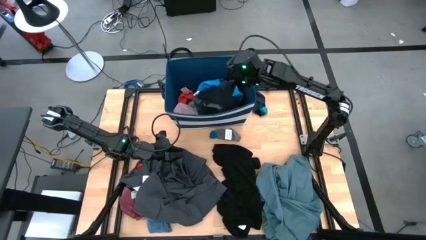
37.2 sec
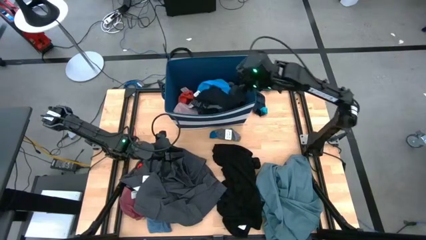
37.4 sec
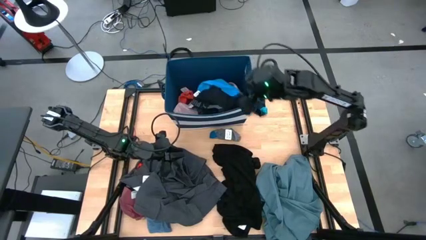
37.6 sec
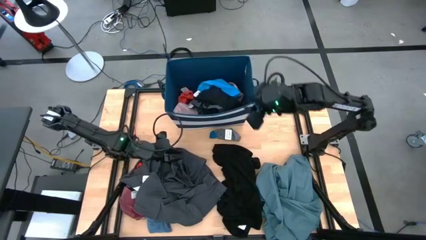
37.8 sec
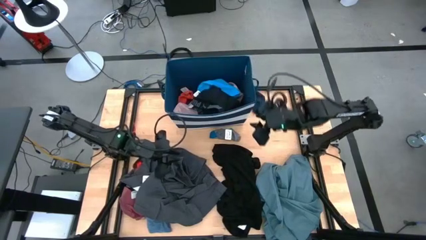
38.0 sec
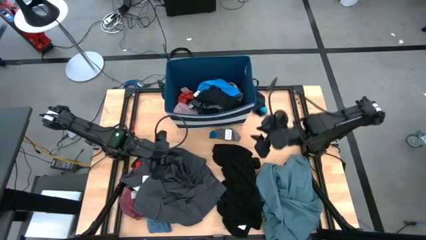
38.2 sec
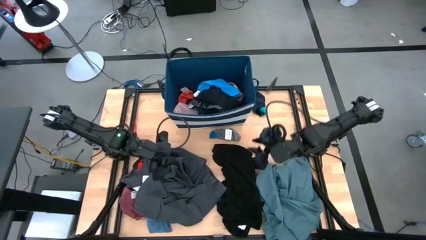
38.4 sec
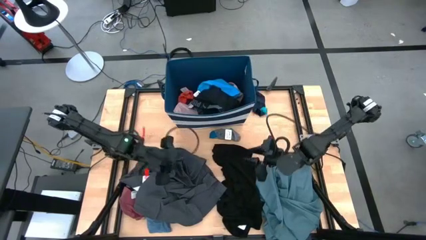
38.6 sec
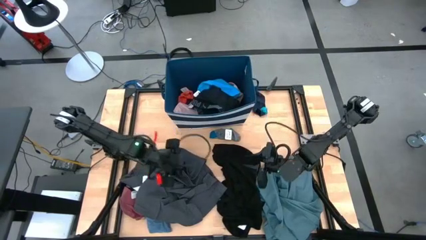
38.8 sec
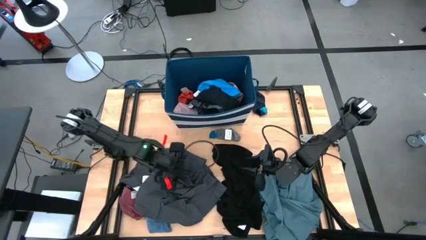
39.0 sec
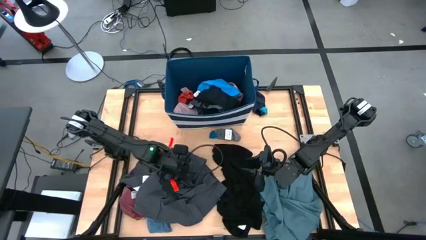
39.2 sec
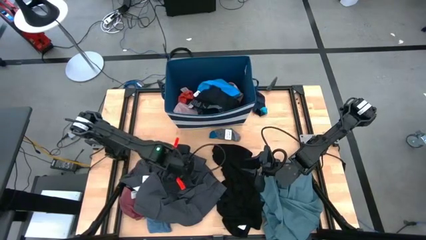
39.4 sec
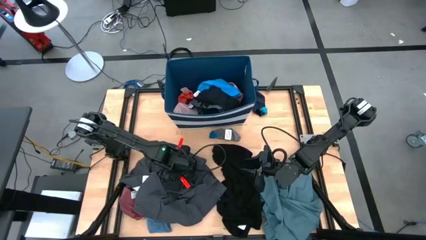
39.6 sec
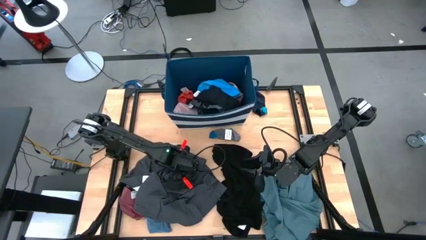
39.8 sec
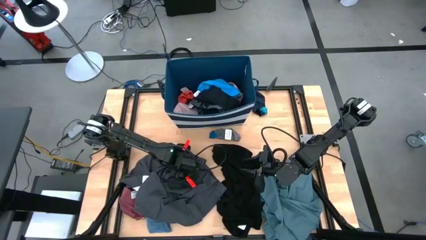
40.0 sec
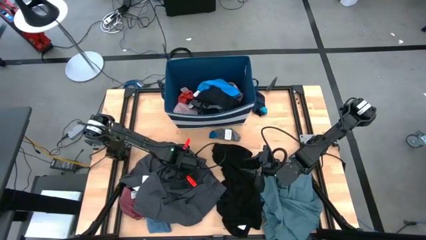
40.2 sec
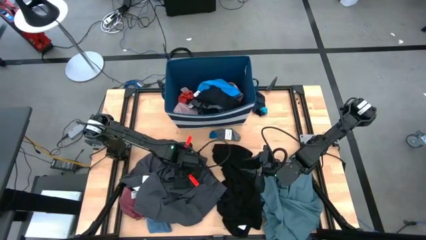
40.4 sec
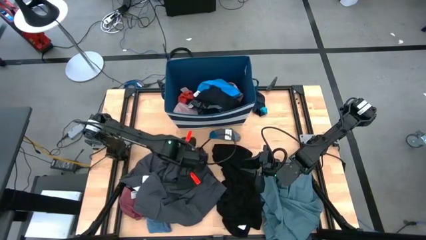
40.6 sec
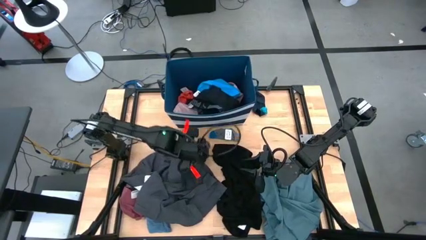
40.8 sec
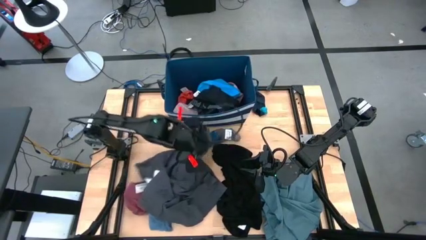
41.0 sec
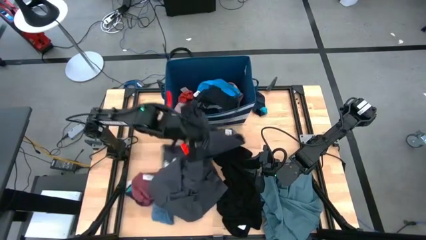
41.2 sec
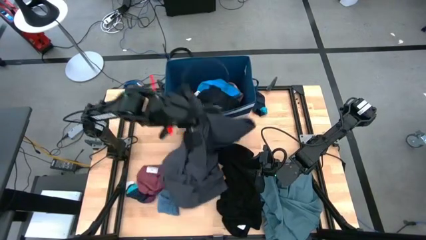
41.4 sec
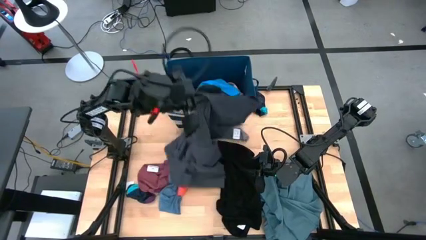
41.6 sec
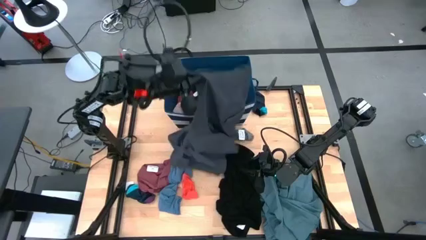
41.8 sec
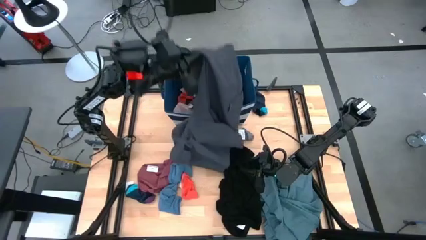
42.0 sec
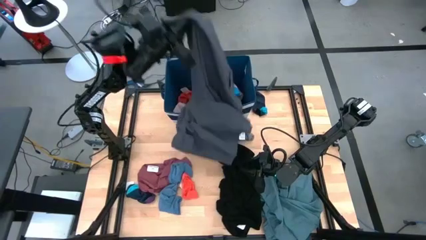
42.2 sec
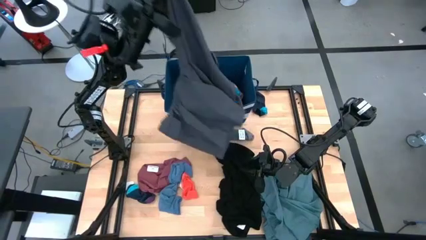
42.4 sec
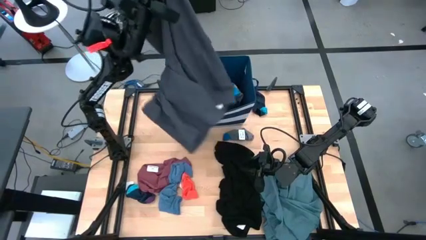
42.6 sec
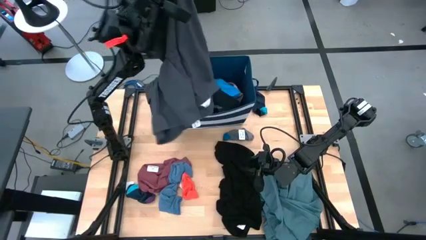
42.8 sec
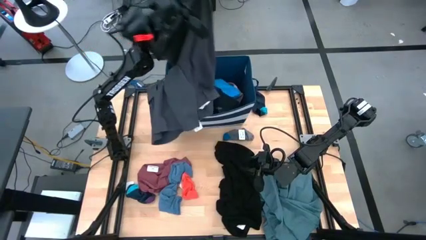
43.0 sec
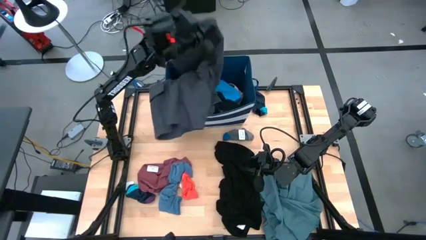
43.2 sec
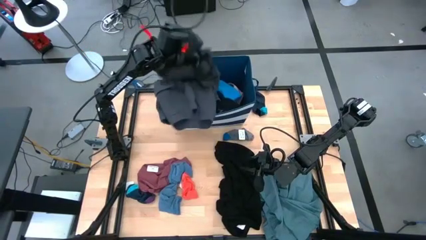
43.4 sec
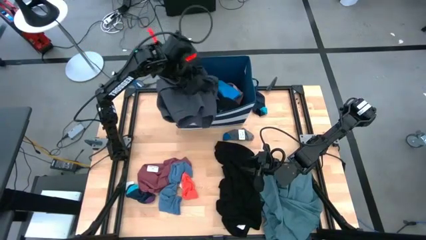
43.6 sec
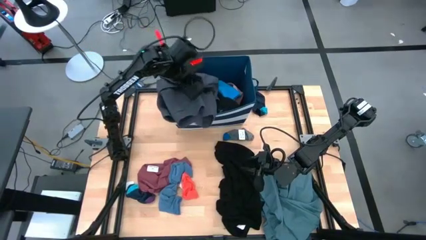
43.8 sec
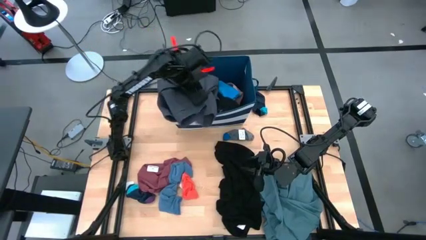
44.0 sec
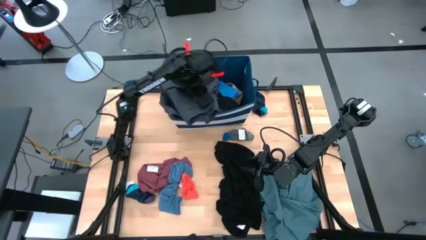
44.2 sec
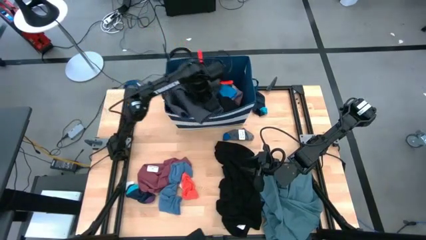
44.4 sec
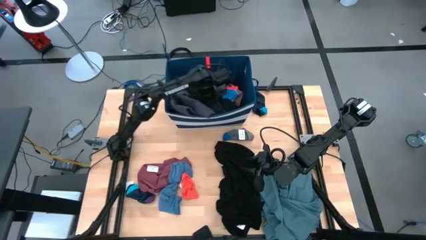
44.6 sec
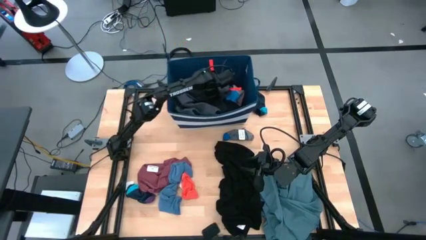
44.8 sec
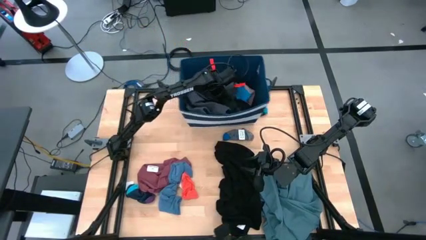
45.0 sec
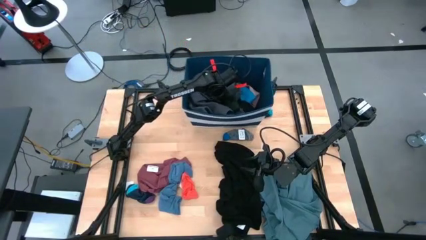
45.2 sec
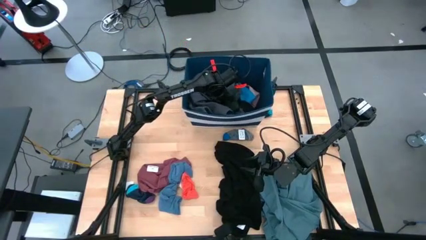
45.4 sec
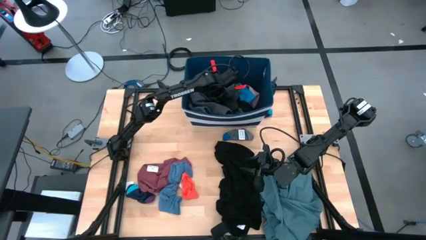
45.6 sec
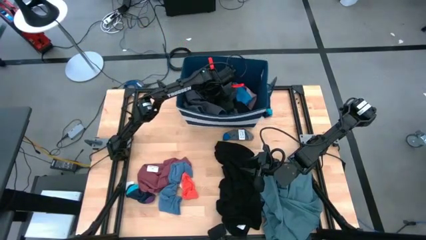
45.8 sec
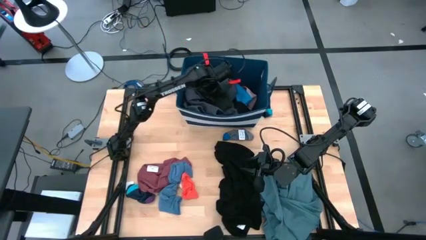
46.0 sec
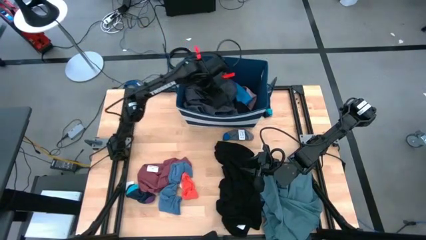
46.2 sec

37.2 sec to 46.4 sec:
Task: Sort clothes
Put the gray pants into the laundry organizer

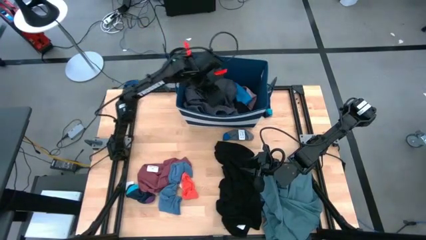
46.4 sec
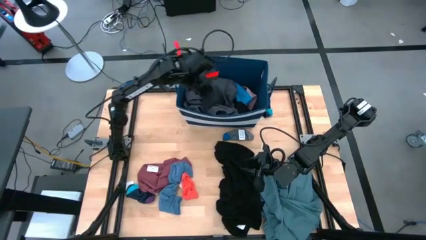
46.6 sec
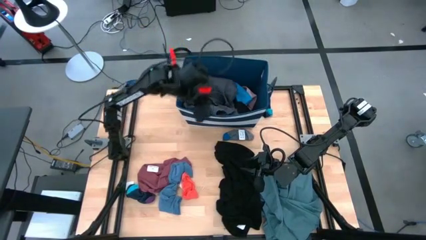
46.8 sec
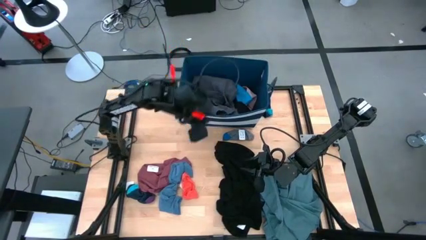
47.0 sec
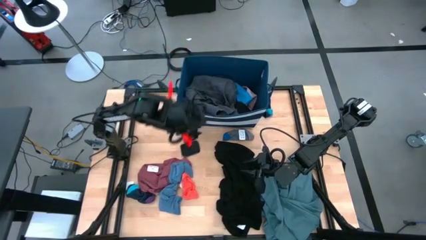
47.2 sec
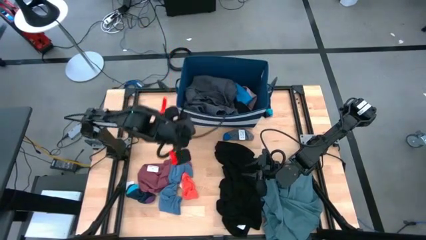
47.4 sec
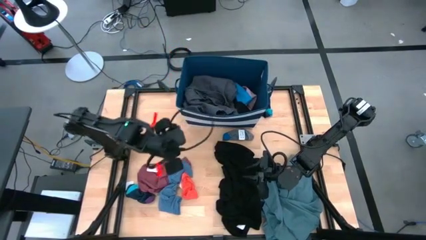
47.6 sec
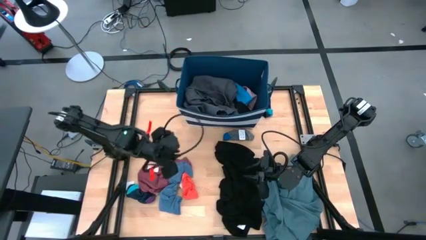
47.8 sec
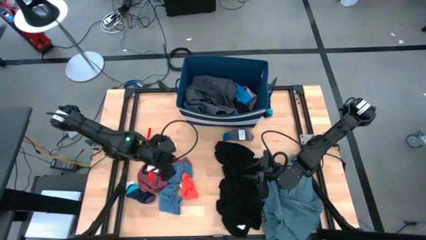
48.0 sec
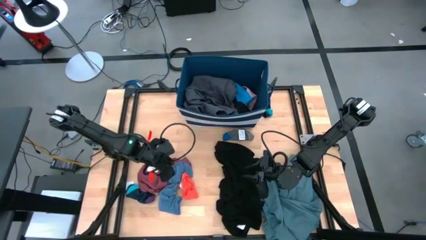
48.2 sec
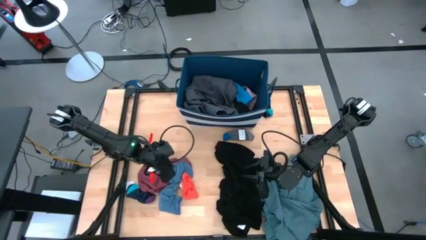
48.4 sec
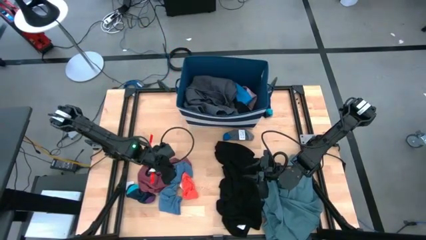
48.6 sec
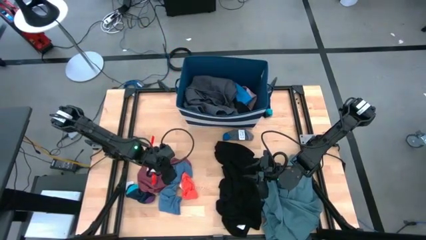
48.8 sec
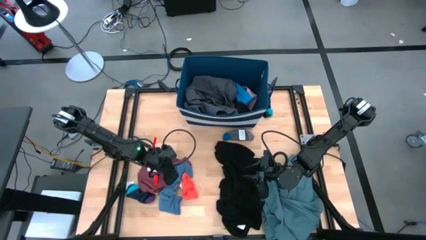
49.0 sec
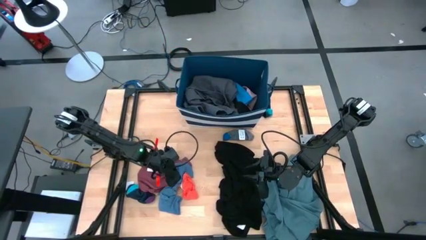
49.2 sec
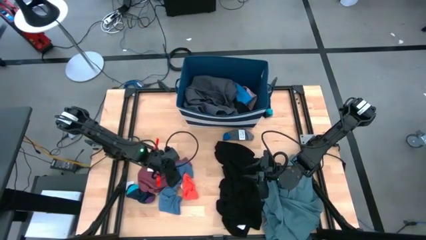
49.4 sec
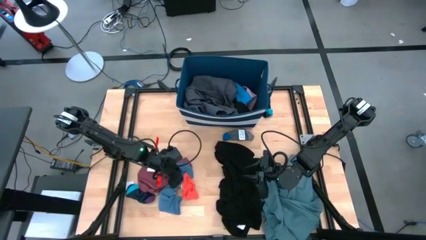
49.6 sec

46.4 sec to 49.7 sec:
Put the blue sock into the laundry organizer

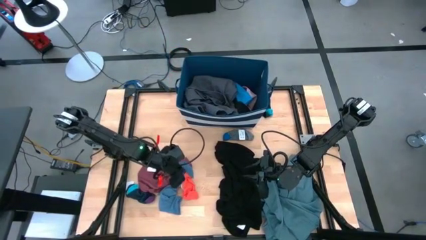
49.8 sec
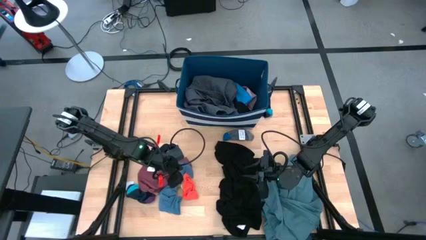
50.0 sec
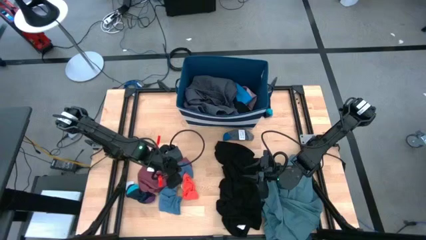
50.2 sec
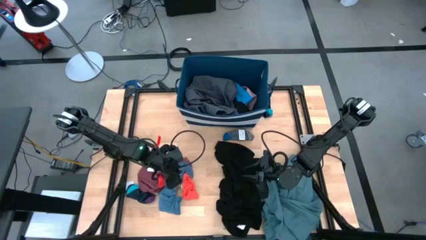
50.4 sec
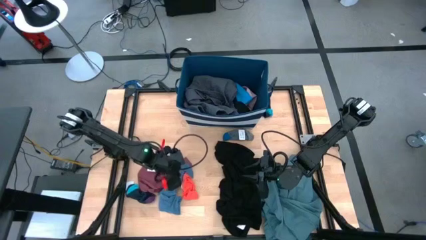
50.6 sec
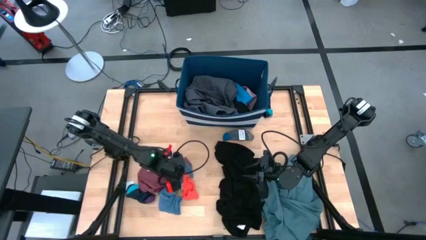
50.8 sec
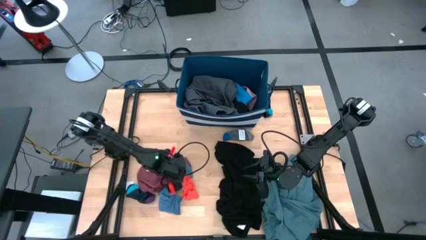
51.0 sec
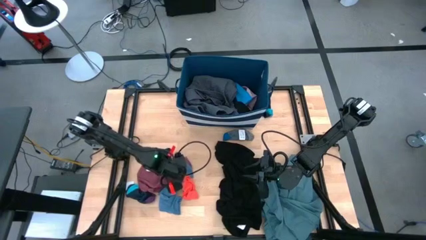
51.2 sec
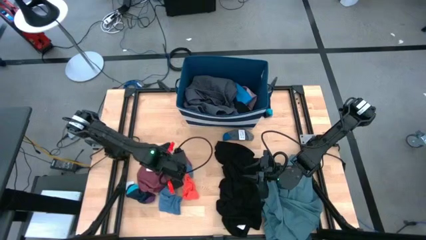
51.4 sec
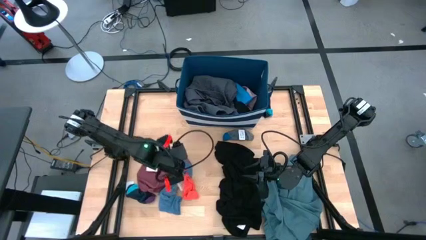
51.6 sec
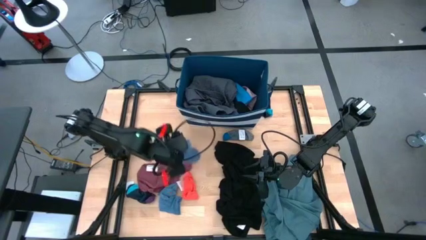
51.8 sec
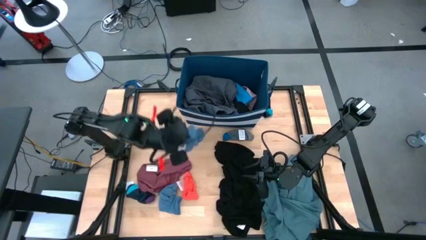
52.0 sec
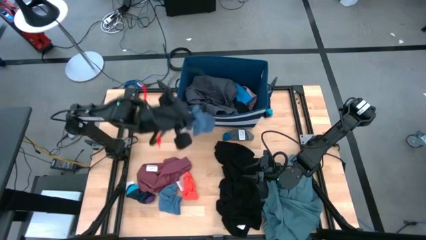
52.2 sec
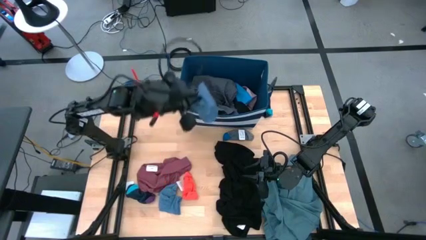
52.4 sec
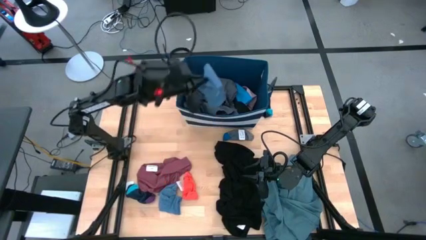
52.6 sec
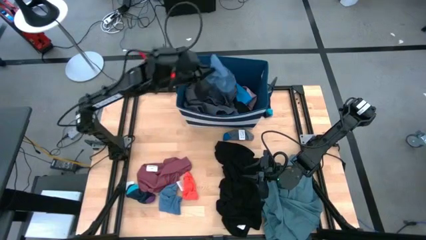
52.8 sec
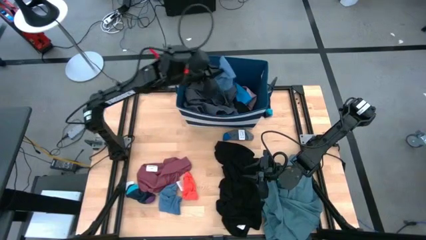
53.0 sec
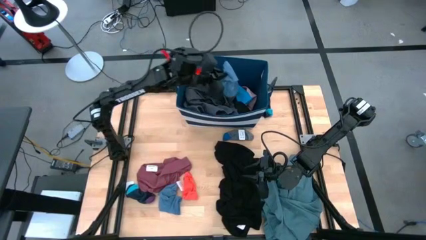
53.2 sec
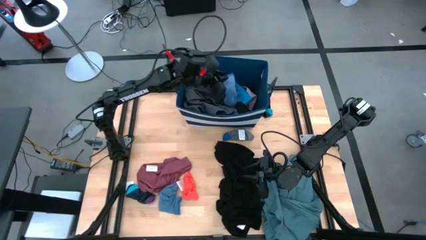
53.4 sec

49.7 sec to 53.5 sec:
Put the blue sock into the laundry organizer

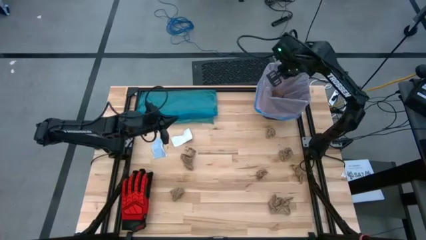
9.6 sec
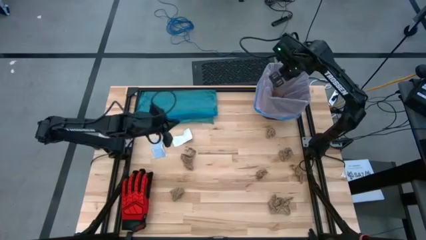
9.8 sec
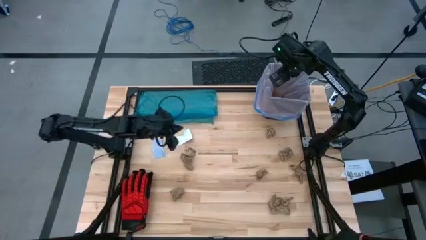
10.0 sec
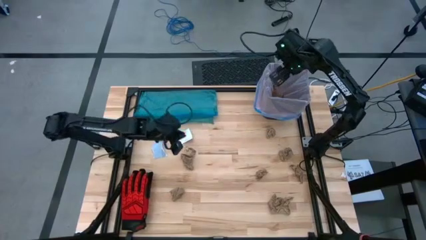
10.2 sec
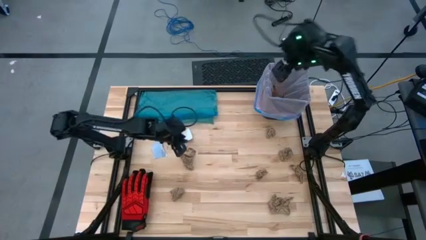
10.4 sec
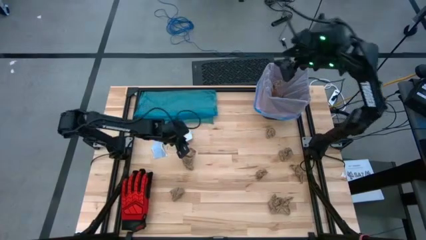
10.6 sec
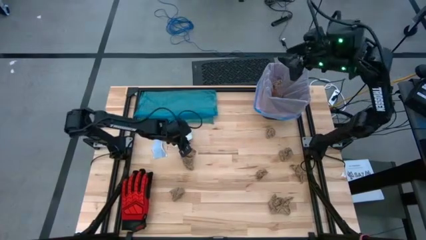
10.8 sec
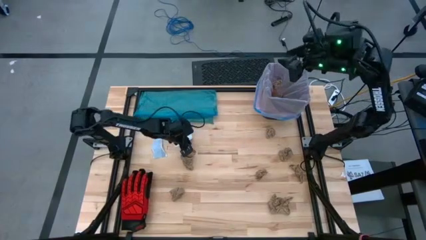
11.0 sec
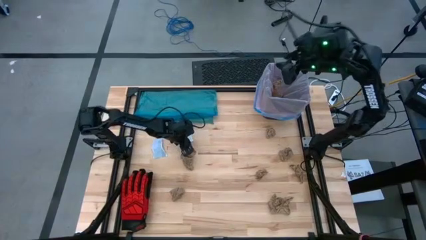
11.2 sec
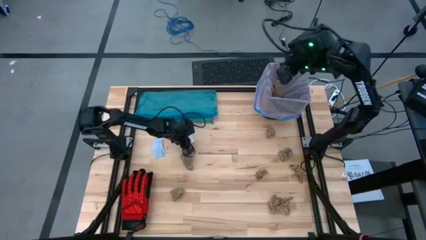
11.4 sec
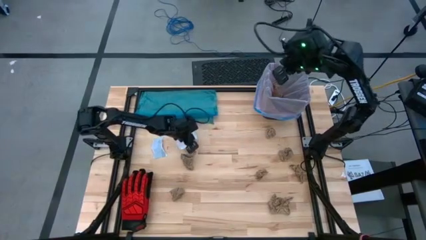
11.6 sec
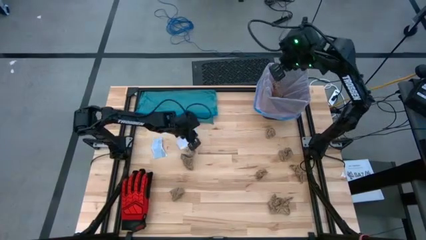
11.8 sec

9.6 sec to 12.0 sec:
Task: place trash/remove bag and relplace
Put the white paper into the trash bin
